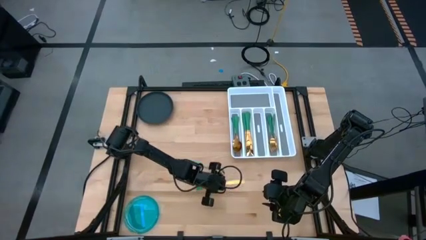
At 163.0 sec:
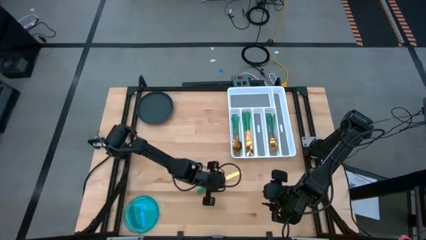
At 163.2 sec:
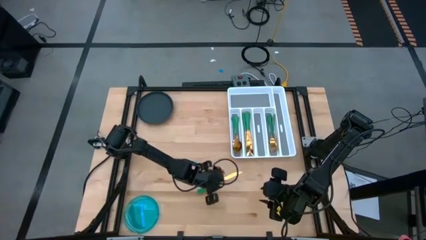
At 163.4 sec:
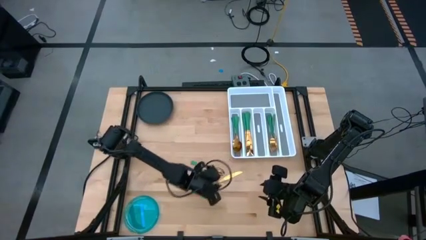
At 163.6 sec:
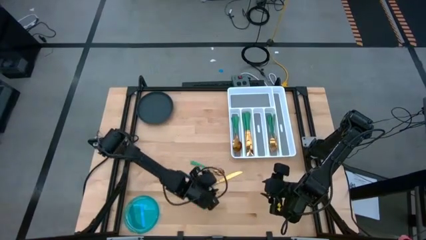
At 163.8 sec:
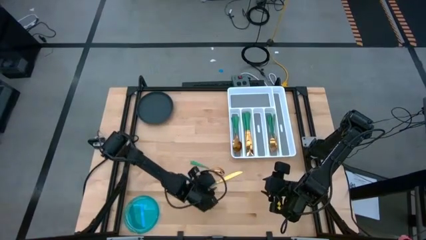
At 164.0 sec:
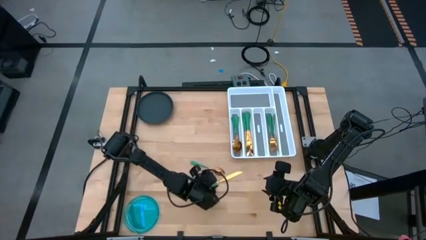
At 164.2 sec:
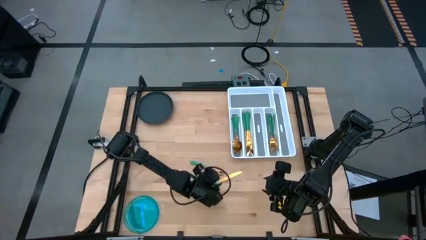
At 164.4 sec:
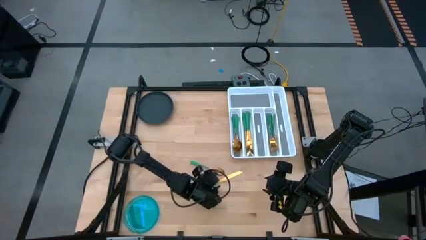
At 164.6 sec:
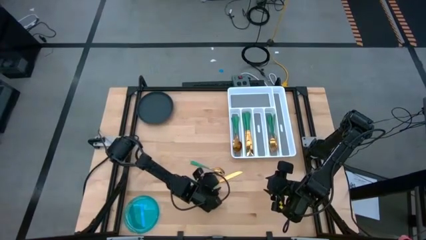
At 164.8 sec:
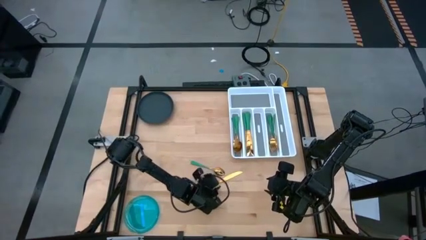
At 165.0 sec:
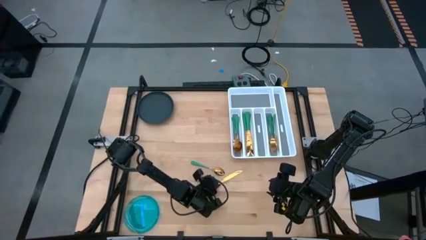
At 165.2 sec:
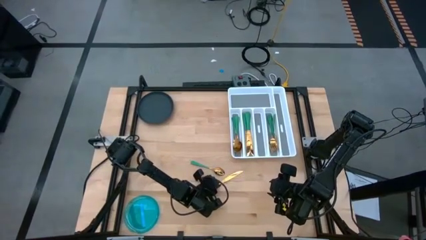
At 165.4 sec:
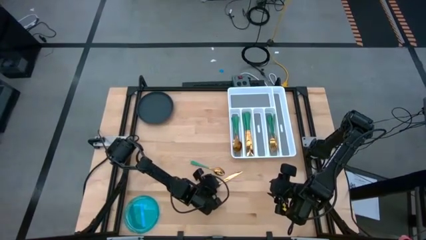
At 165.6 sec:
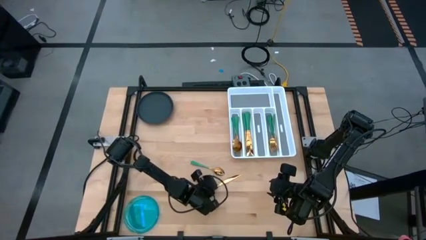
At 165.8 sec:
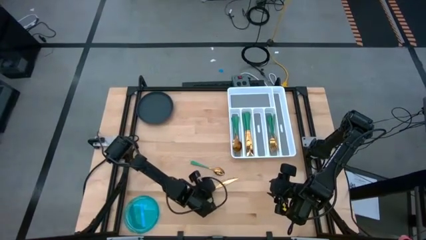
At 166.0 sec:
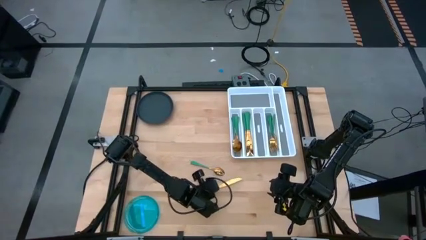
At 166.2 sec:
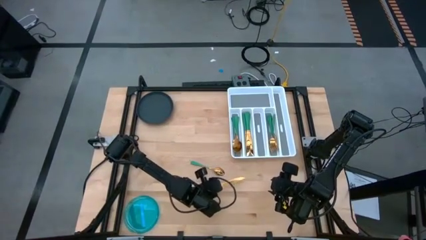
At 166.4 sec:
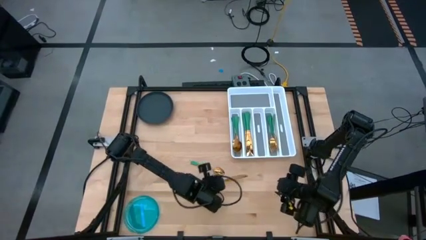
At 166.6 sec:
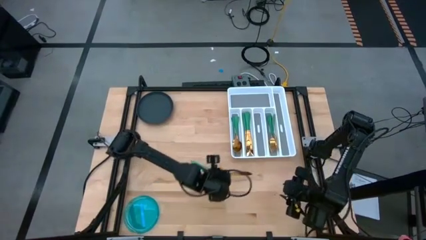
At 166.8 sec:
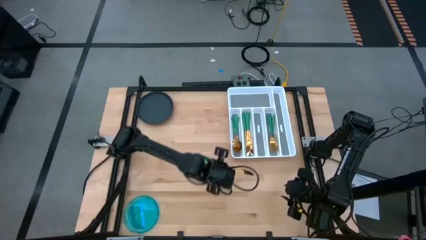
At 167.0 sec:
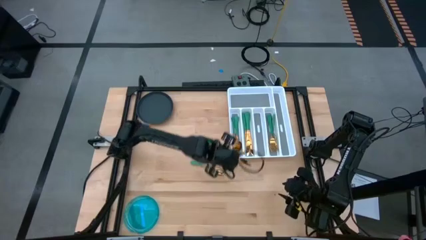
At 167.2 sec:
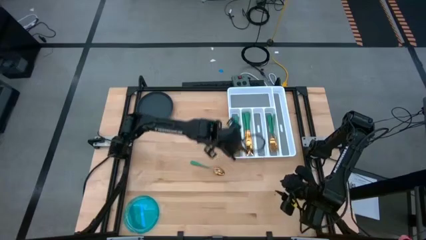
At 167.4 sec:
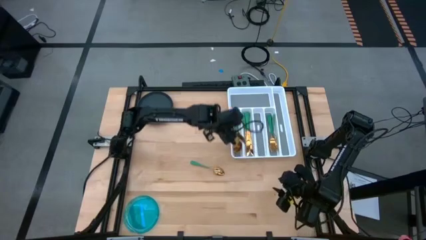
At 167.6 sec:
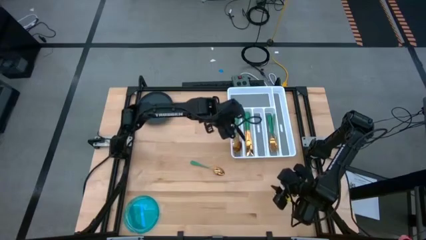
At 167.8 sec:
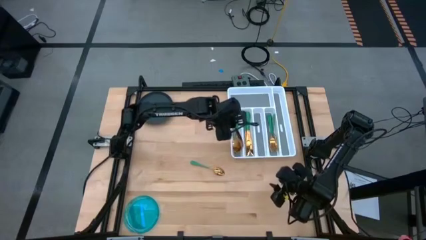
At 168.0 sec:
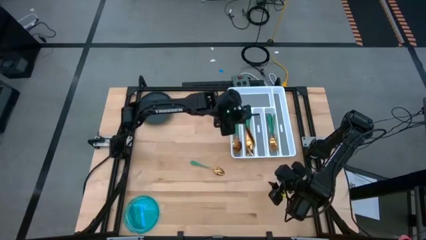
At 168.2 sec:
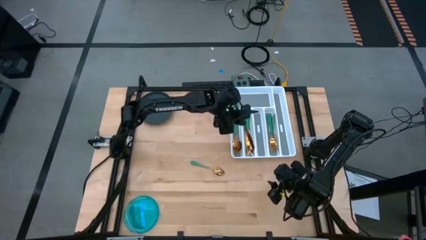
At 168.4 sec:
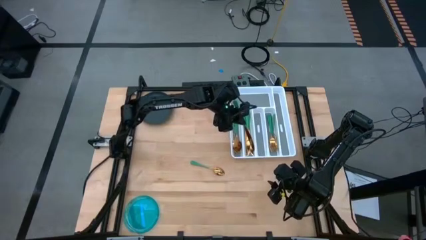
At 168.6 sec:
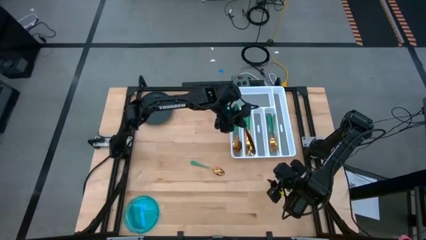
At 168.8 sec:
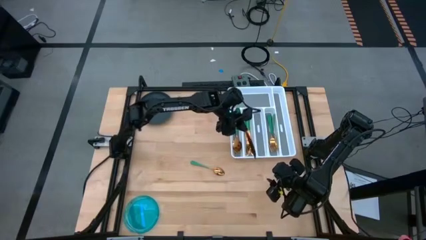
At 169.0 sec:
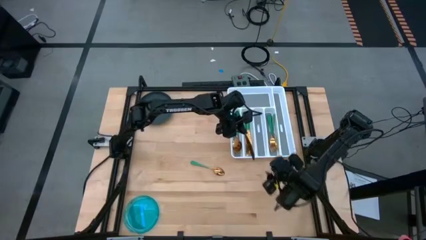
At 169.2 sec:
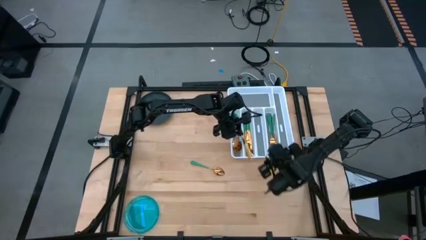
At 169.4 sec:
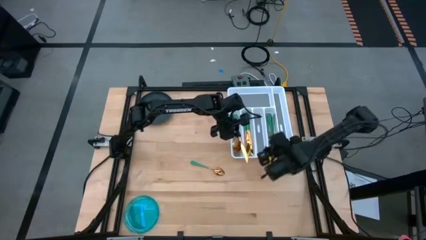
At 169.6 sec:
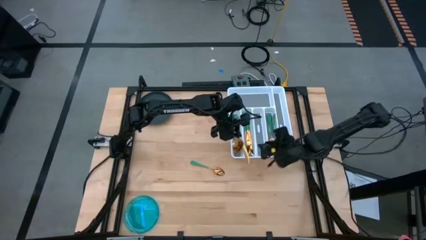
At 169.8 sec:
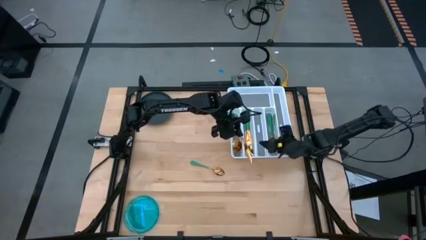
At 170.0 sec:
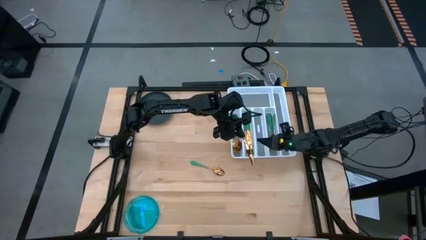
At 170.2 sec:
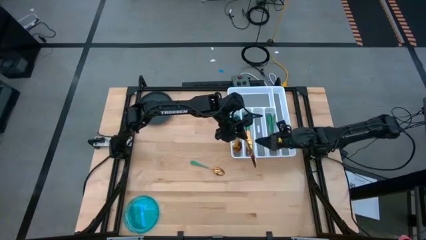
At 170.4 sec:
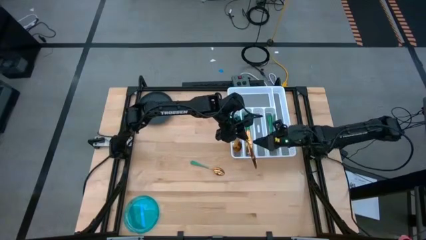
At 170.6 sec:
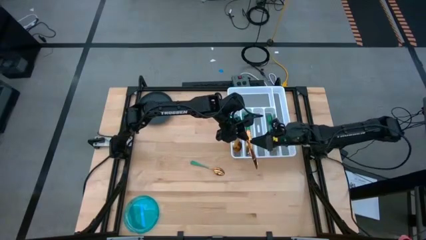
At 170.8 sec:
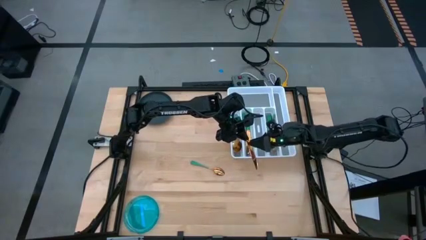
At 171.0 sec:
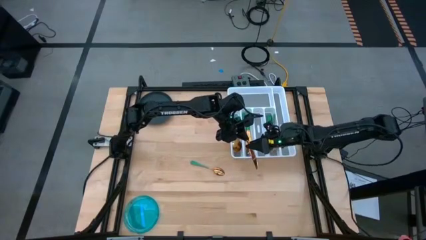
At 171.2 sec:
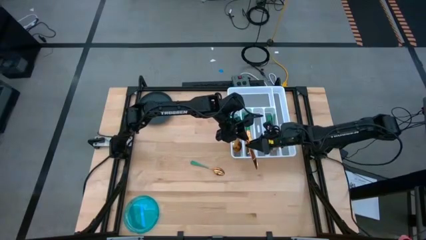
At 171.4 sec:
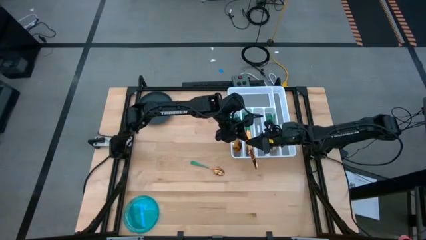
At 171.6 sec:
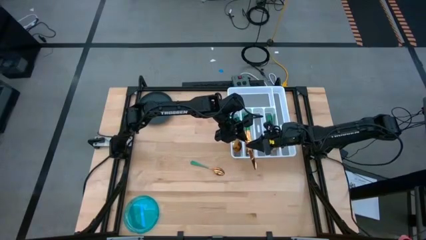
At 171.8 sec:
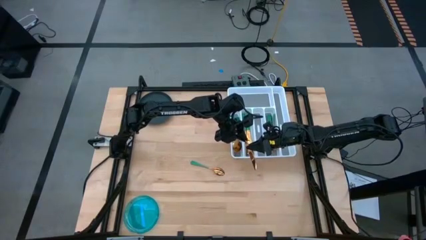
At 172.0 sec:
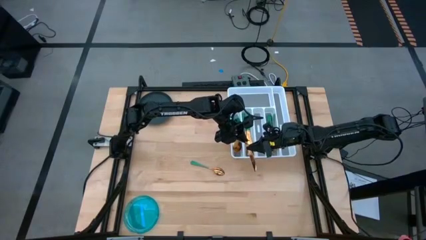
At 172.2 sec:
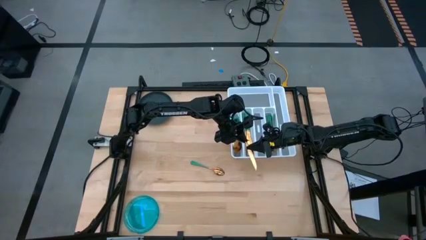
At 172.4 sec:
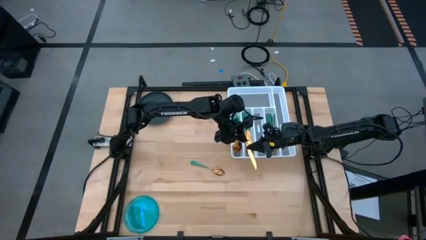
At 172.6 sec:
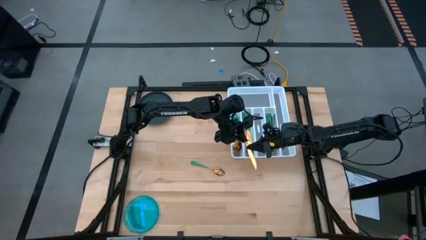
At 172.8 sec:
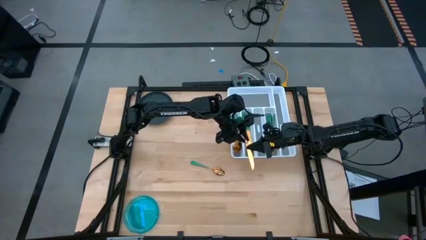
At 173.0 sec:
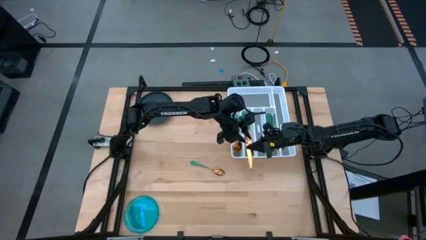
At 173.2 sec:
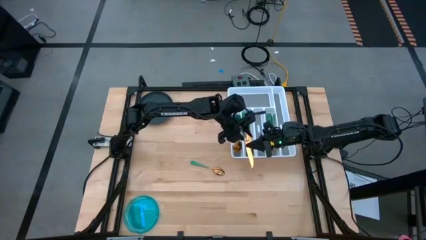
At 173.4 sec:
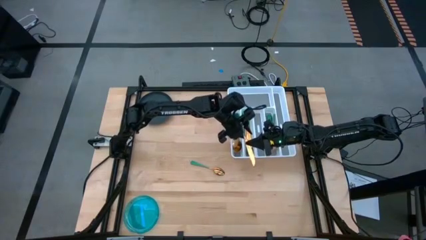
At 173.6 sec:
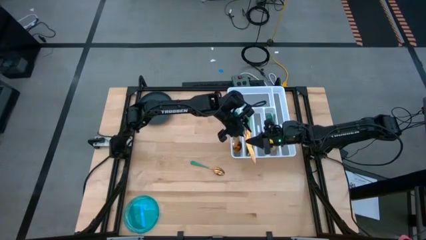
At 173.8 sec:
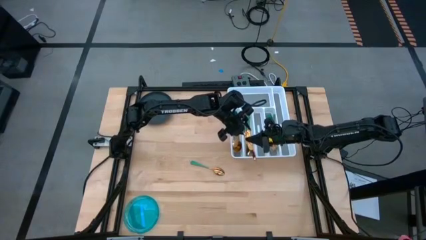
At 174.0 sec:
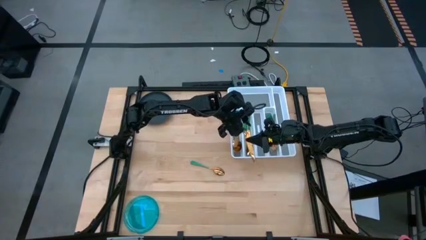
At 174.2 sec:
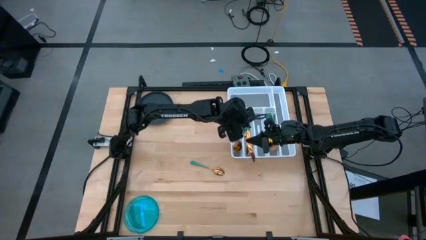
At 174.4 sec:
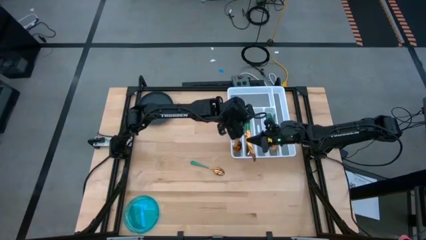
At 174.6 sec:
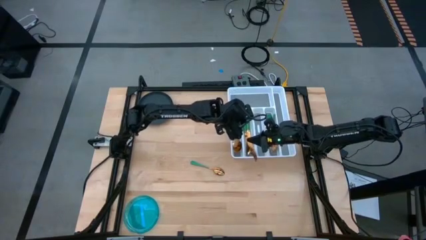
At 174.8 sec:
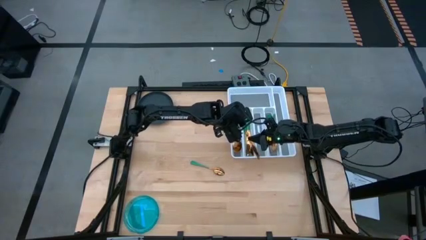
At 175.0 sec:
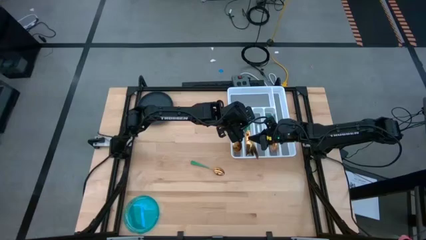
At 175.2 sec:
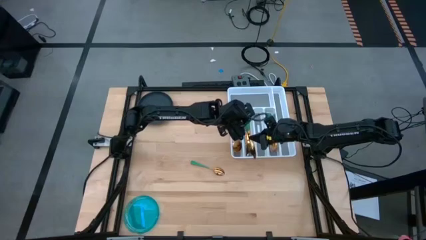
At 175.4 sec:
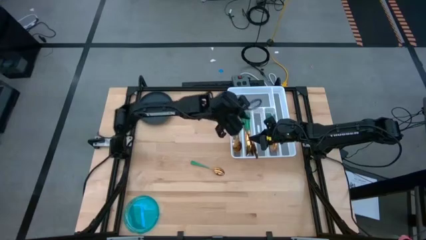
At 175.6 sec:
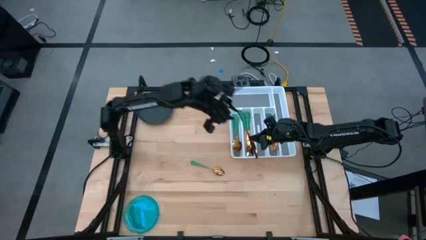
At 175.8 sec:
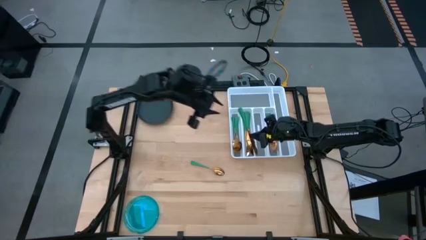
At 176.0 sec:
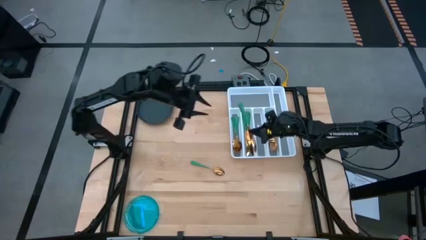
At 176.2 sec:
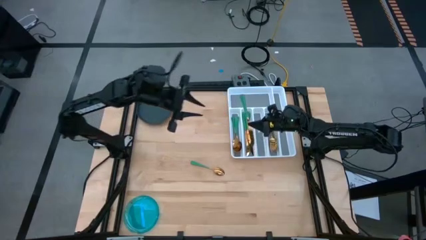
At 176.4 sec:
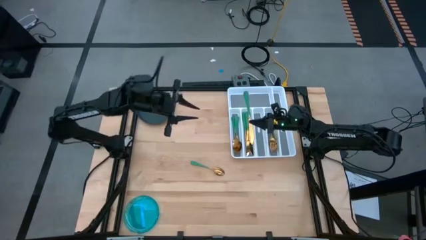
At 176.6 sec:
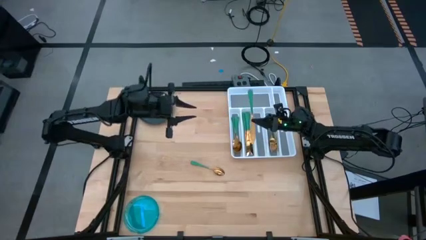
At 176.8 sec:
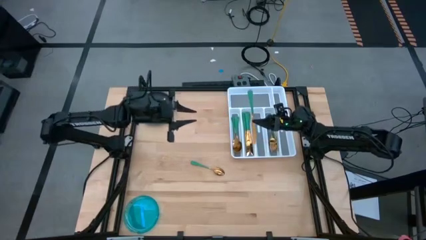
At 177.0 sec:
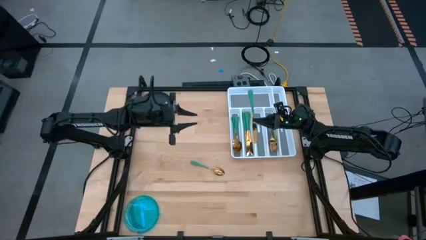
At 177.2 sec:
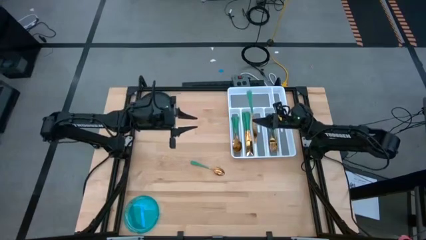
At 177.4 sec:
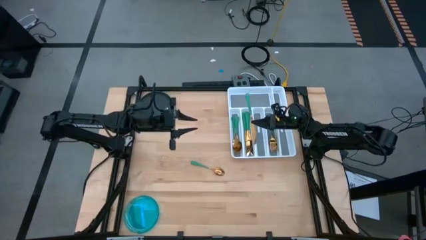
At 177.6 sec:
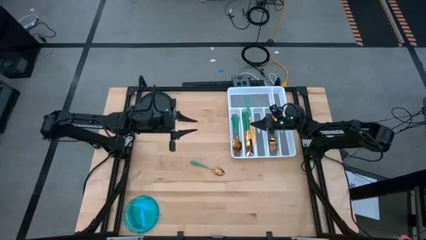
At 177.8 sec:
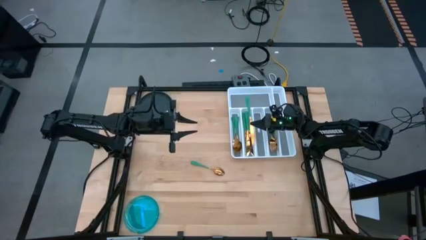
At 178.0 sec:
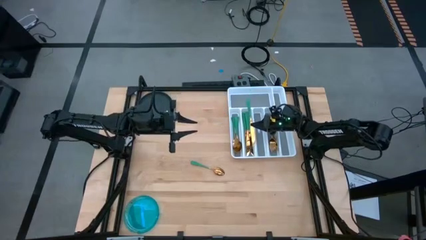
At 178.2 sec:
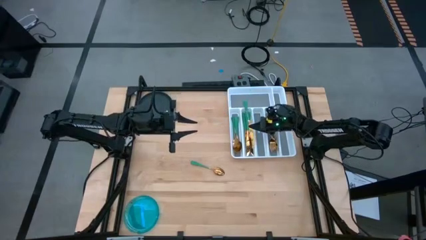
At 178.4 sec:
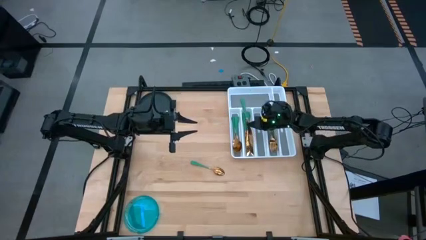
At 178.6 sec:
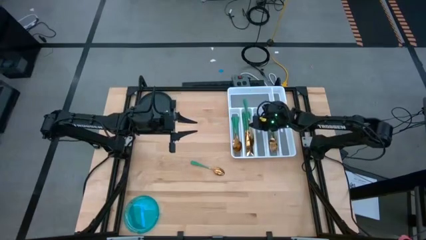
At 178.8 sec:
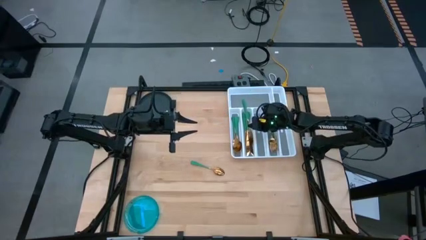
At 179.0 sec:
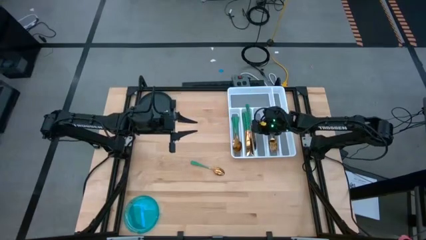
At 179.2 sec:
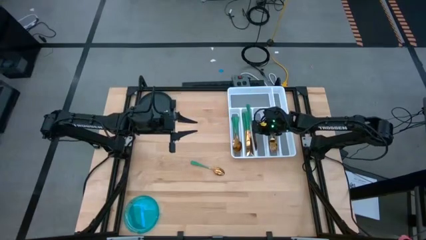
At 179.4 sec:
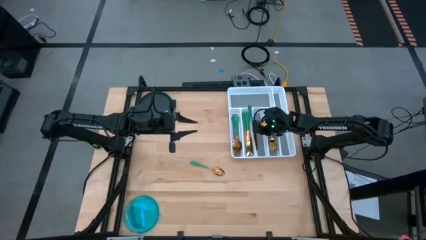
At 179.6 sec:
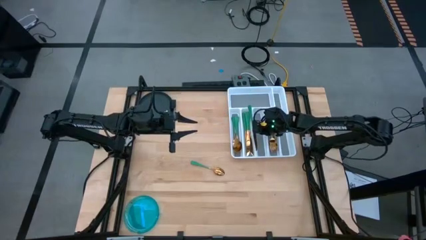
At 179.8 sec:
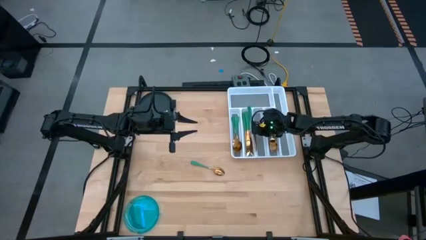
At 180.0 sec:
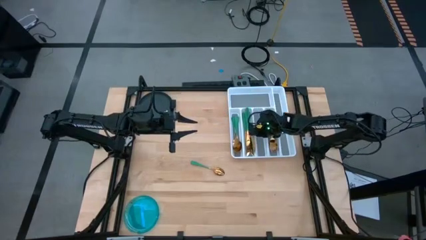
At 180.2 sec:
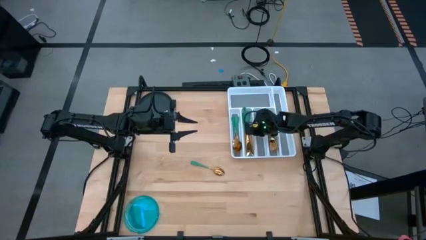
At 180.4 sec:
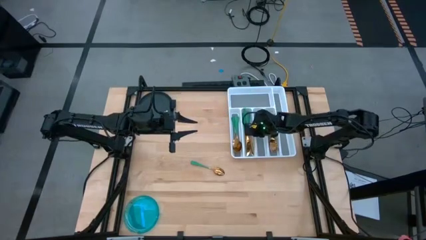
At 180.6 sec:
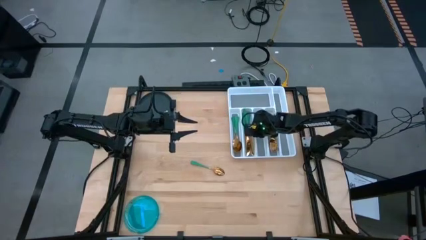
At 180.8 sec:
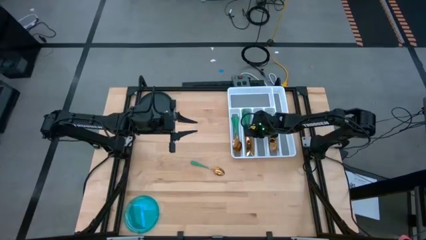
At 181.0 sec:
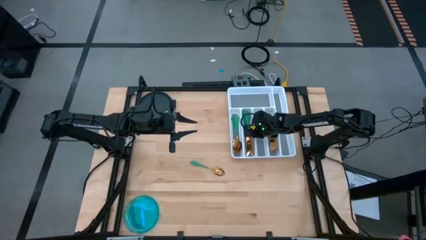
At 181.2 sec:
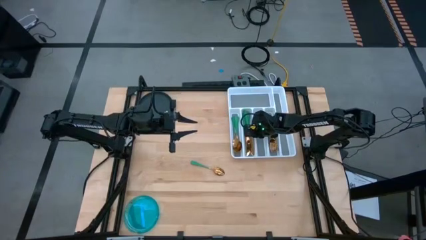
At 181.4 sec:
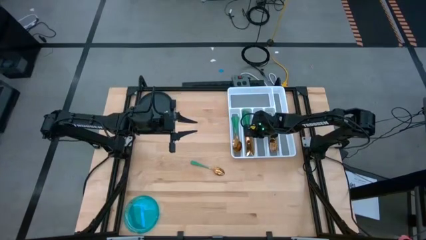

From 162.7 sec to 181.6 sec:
Task: Sort silverware
Put the green knife on the silverware tray with the other green knives
